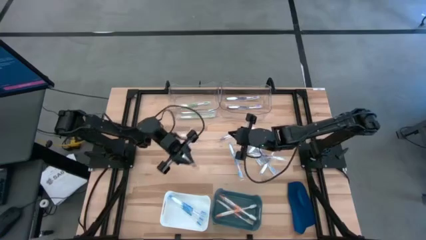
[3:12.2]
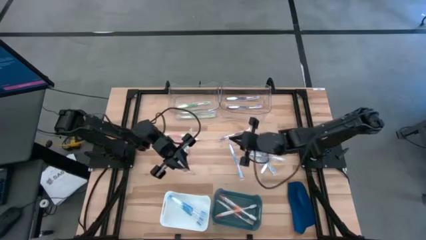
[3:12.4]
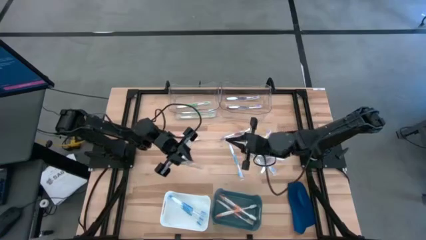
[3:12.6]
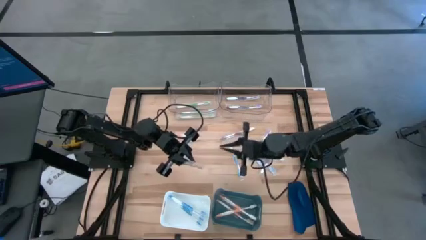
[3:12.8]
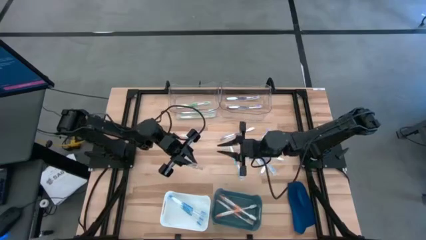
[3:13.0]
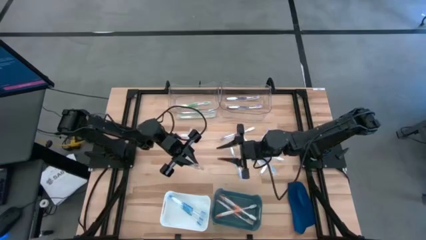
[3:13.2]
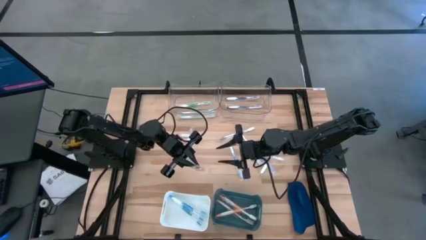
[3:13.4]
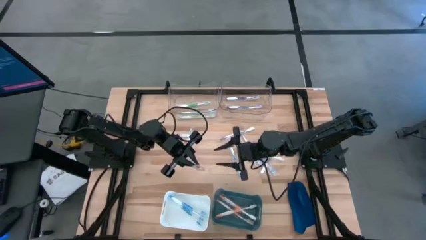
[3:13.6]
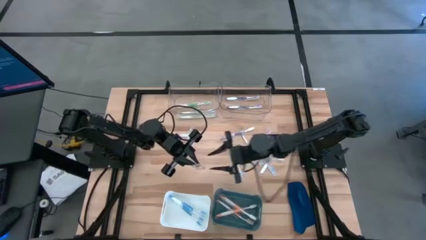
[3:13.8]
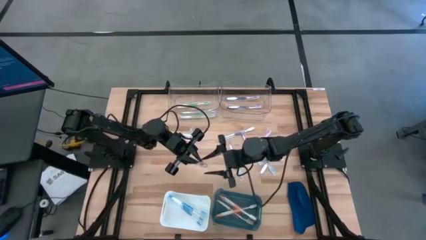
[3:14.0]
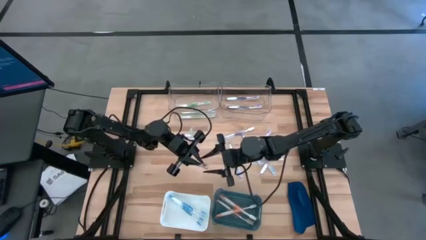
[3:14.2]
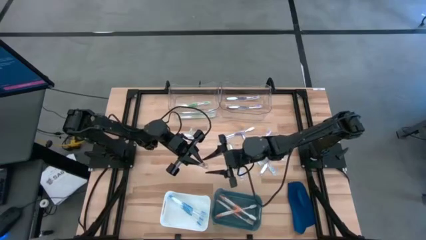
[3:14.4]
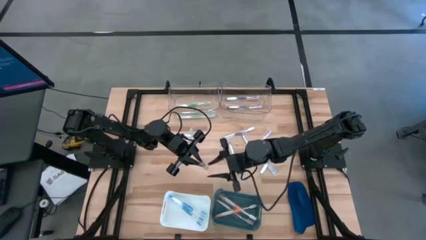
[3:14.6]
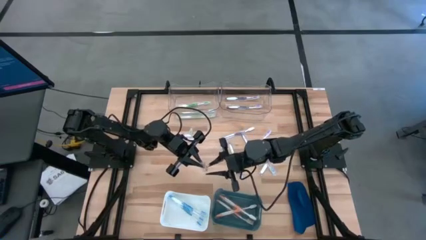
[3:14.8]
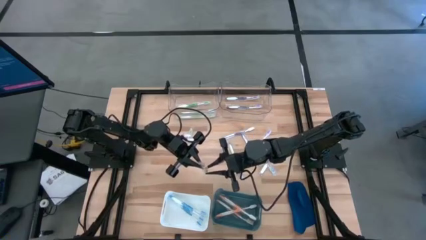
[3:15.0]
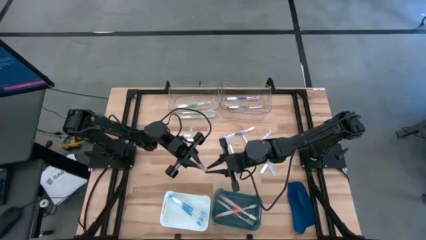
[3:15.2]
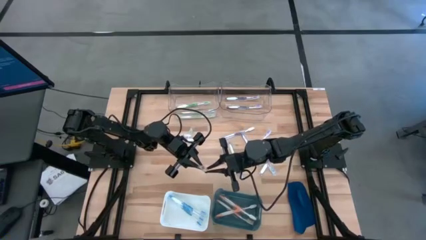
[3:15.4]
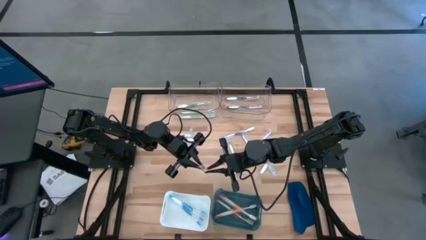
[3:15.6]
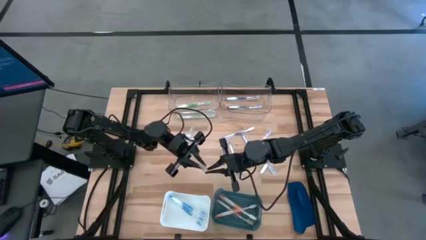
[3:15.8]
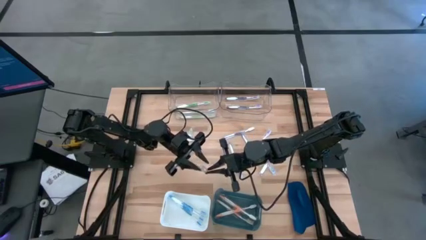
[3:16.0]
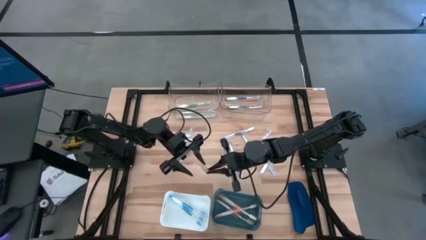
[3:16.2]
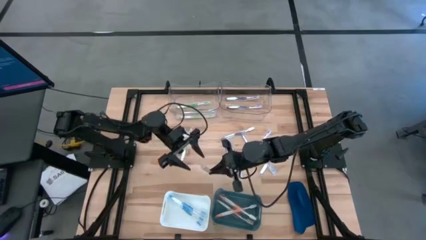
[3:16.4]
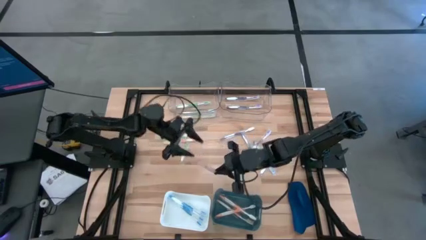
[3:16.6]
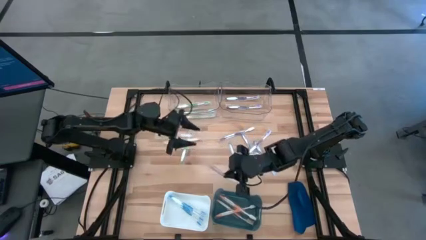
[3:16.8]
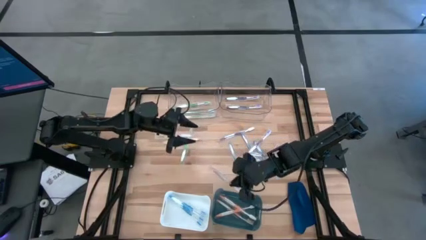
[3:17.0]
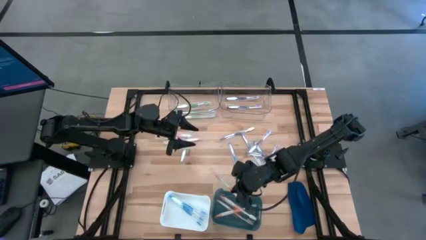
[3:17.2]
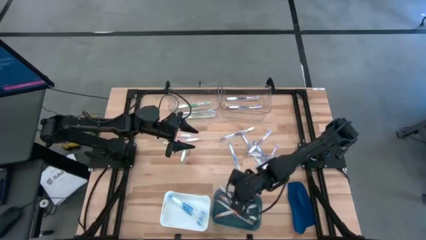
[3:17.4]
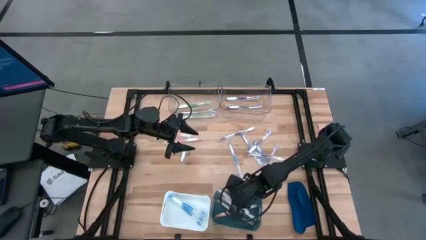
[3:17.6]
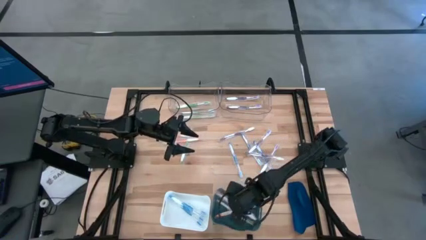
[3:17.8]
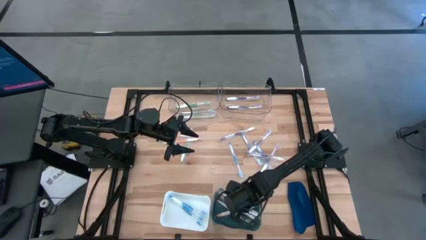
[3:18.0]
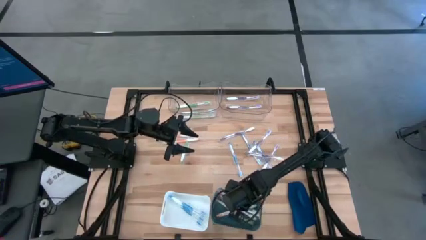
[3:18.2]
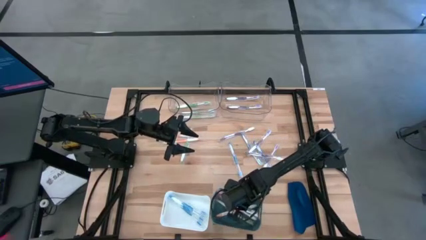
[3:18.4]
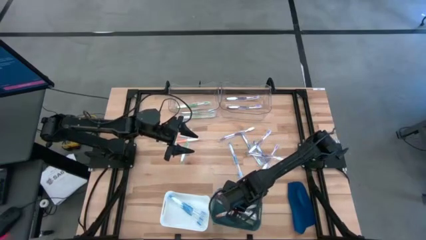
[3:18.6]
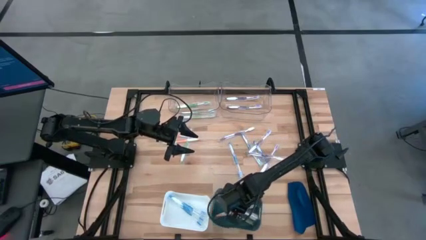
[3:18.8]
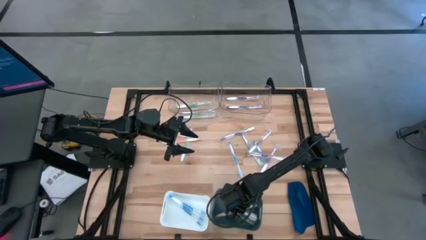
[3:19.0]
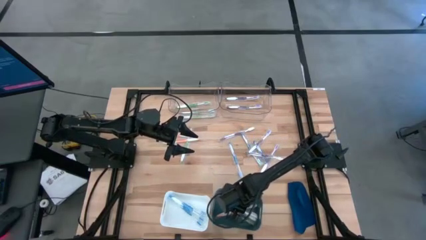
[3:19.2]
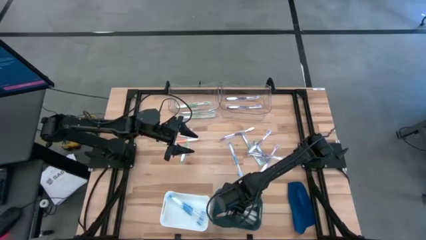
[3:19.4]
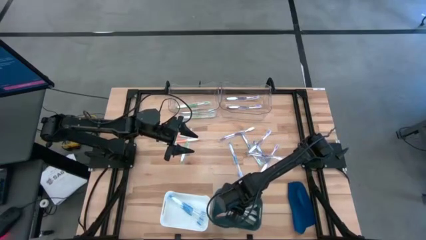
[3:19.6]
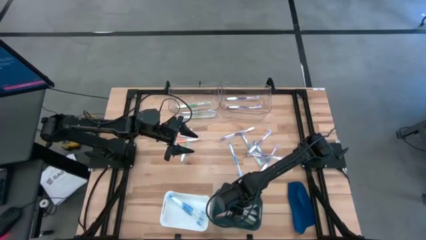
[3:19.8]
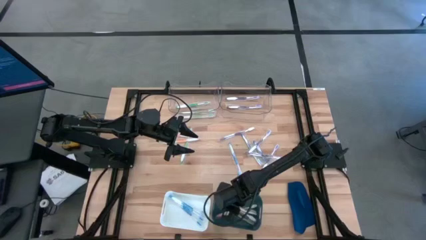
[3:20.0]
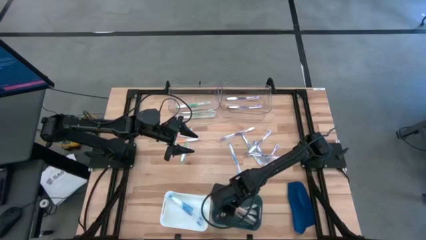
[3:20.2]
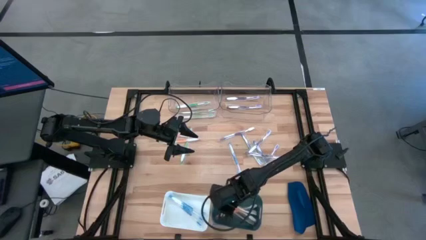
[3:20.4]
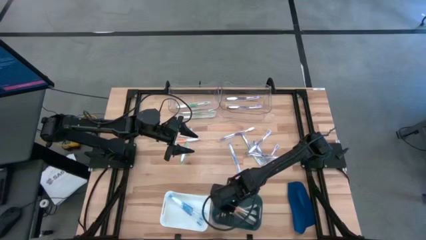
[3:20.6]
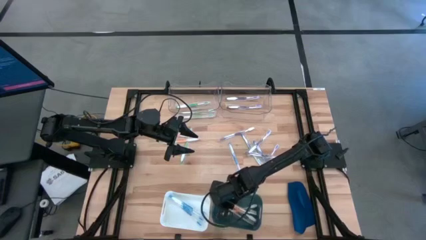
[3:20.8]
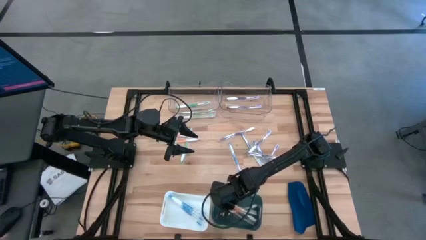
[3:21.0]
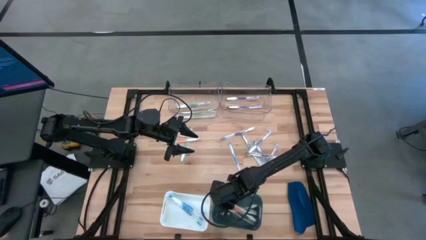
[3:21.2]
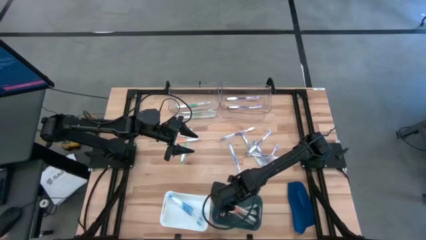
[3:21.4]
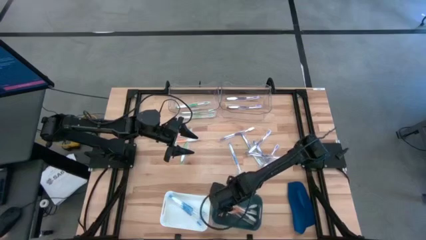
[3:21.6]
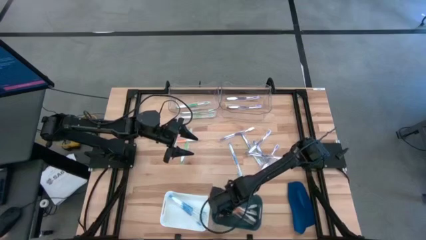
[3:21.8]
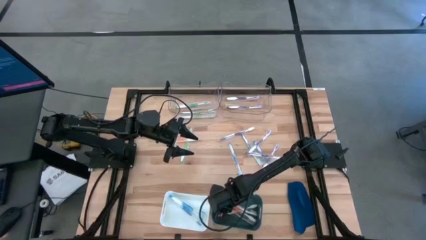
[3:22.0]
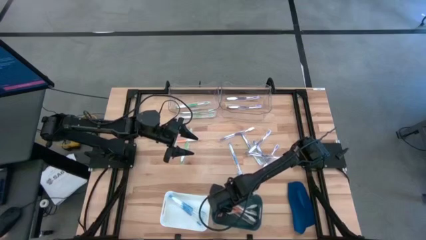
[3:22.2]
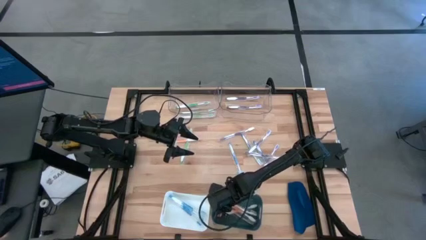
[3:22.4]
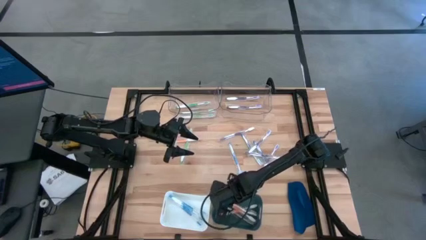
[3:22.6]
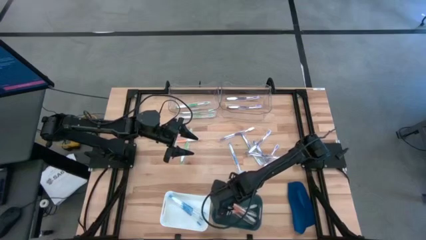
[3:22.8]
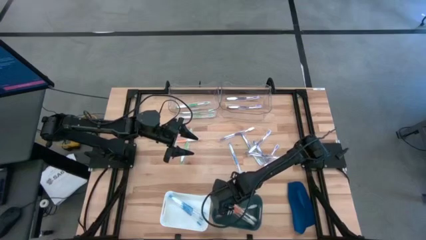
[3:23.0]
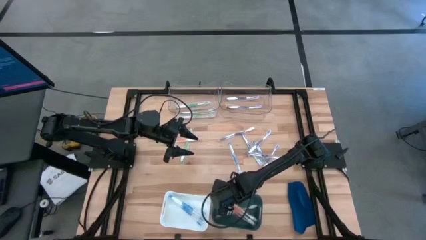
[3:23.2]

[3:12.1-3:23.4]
Task: Pick & Place Toothbrushes
Put the orange toothbrush into the green bin

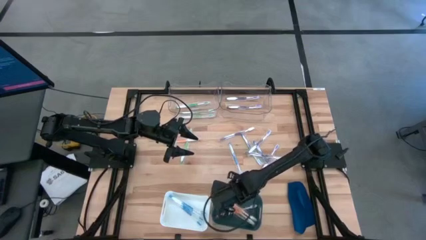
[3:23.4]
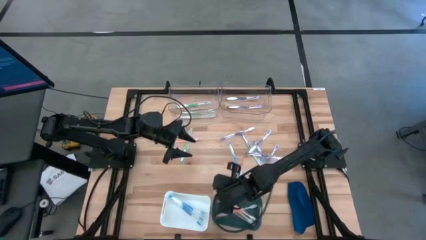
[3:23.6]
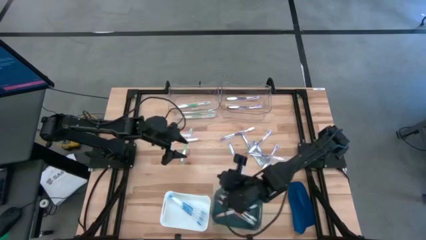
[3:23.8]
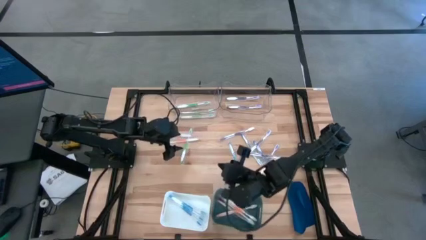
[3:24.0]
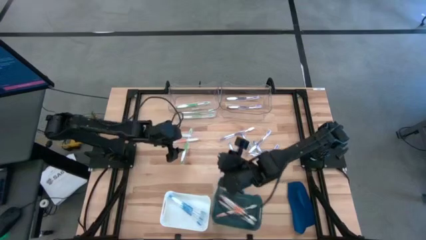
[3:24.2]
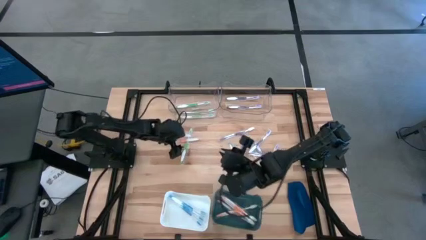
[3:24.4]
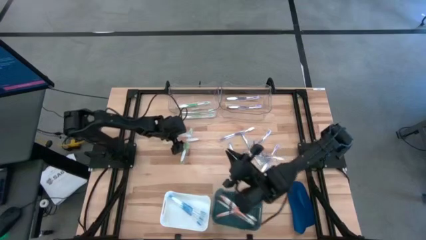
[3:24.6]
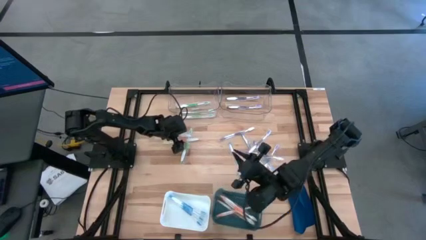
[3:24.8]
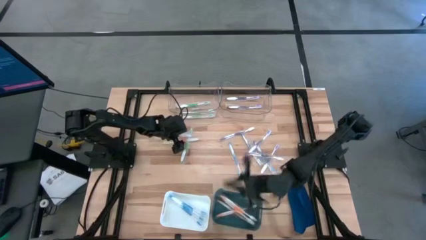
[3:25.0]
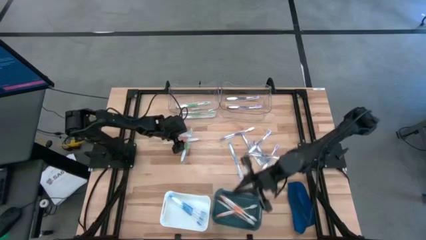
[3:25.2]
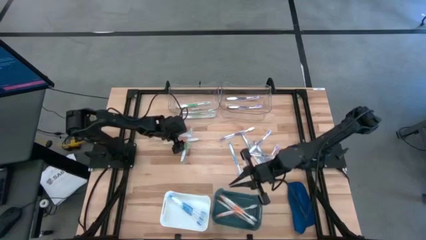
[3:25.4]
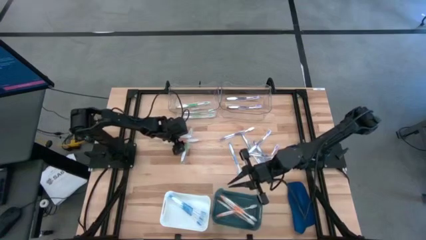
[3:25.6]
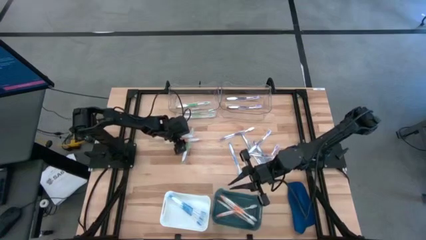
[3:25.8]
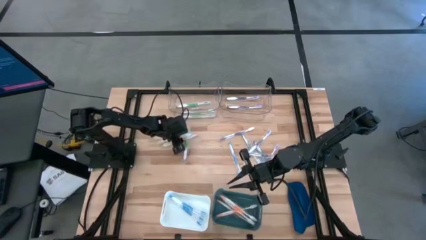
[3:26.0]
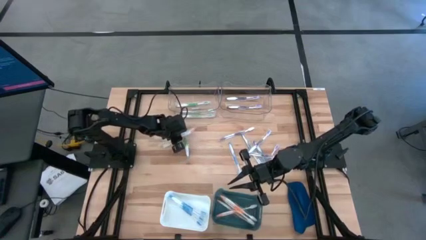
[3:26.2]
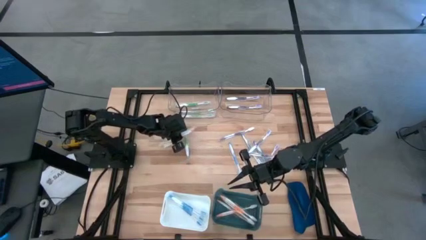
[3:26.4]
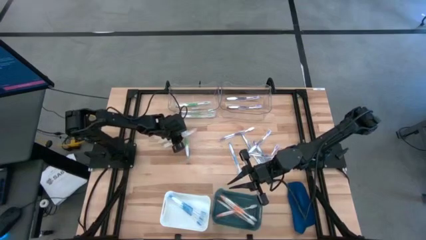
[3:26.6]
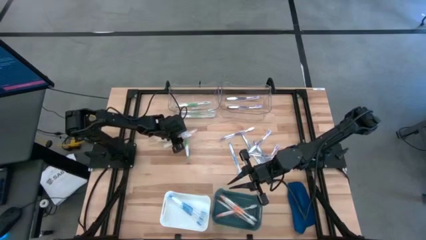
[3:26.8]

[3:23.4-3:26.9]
Put the orange toothbrush into the green bin

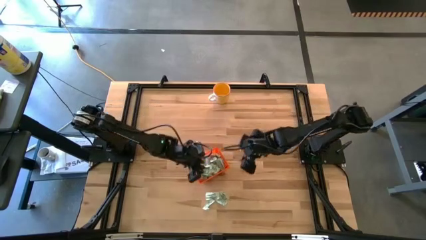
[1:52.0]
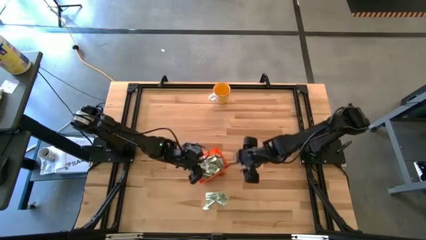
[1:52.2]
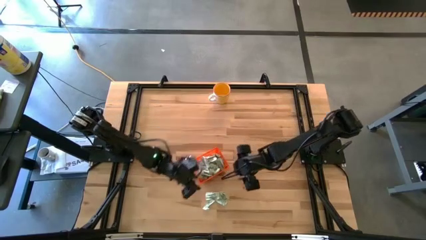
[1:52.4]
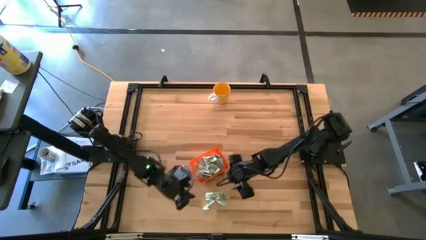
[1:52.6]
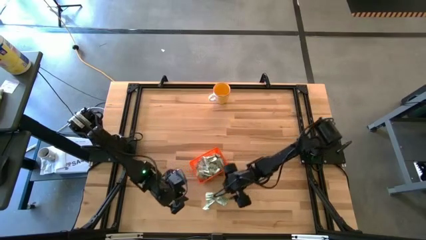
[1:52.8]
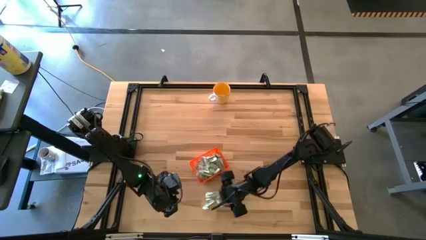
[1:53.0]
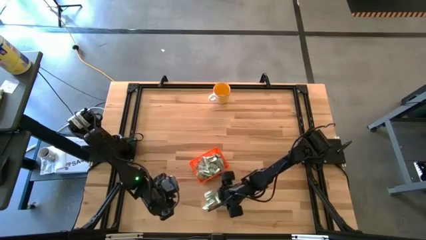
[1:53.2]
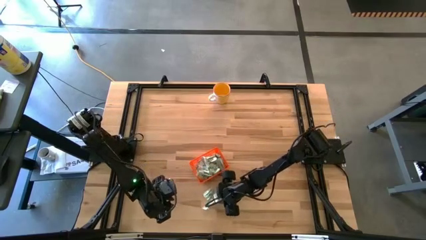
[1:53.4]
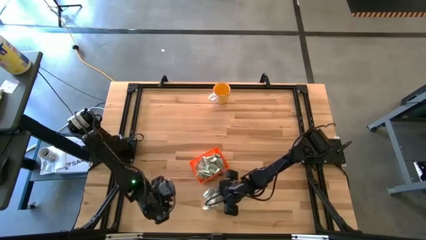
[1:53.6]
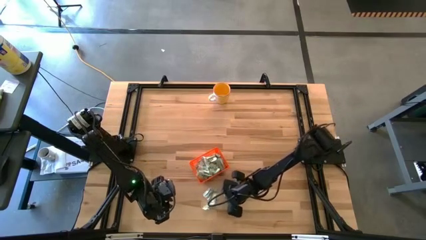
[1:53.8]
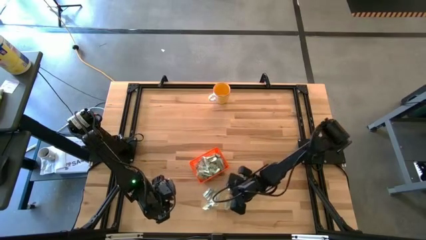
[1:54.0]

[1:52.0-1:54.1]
Task: Pick and place Stevia / Truvia into bins
Put the stevia packet into the bin

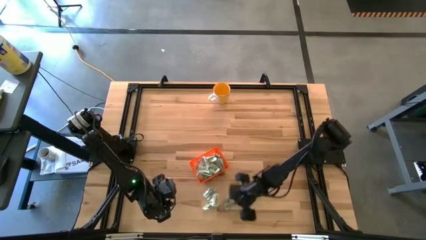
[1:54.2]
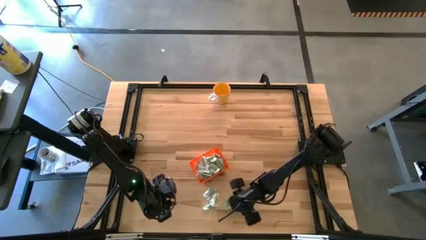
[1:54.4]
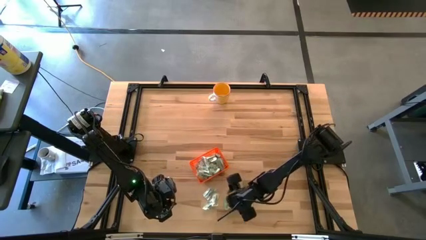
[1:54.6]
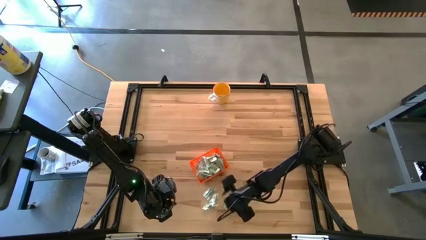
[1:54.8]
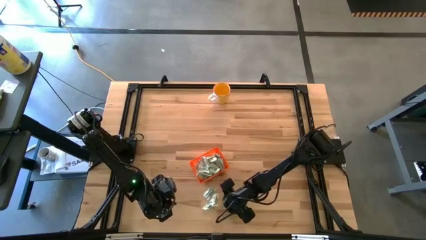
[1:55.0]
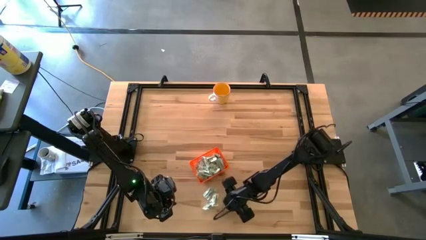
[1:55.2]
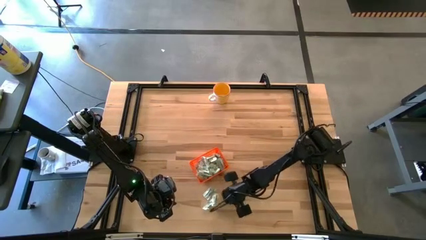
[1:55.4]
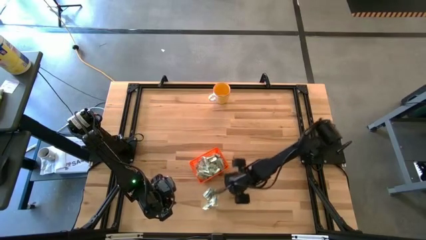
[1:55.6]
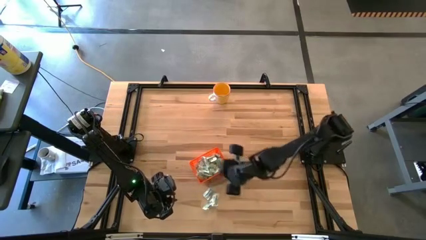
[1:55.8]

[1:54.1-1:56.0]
Put the stevia packet into the bin
